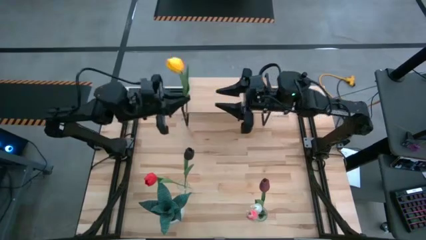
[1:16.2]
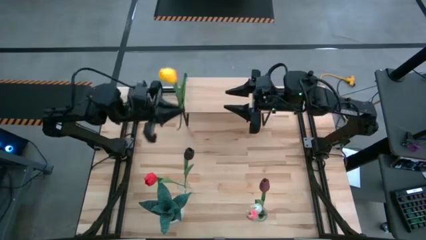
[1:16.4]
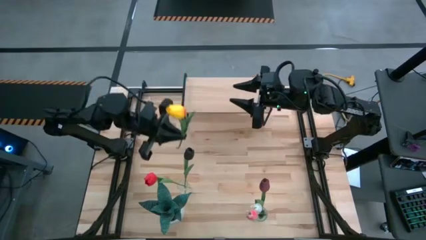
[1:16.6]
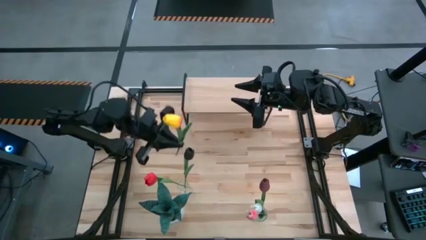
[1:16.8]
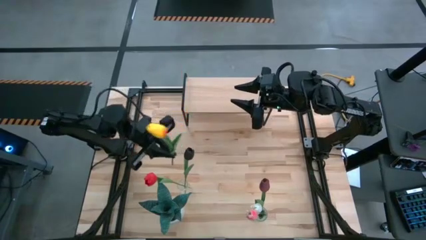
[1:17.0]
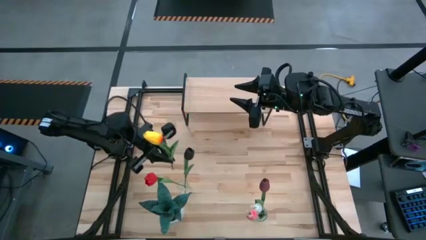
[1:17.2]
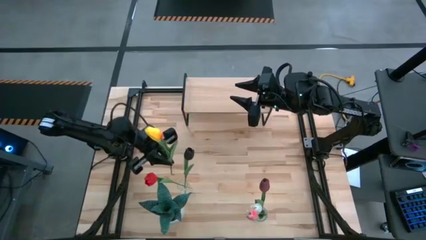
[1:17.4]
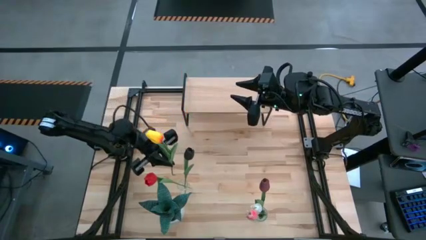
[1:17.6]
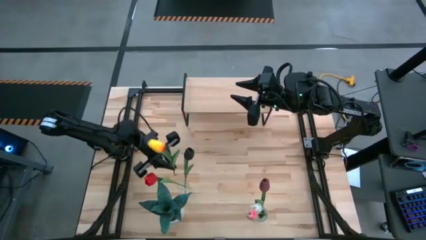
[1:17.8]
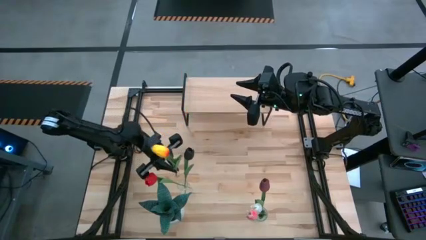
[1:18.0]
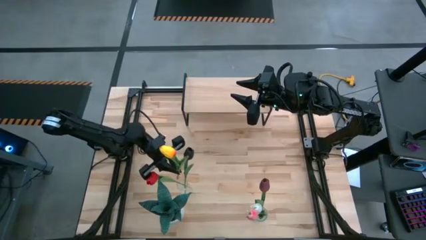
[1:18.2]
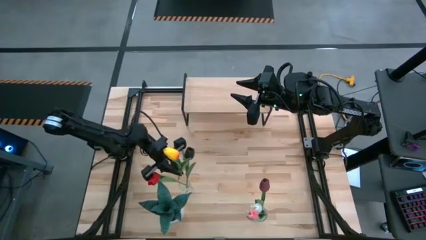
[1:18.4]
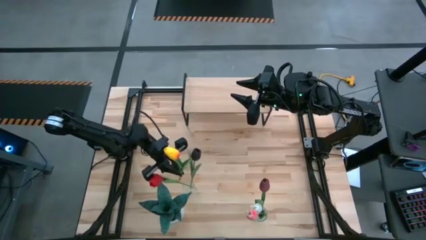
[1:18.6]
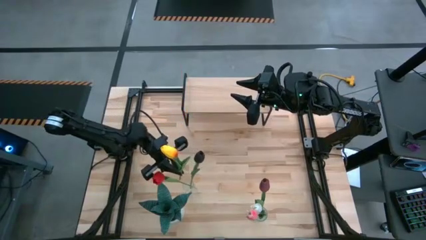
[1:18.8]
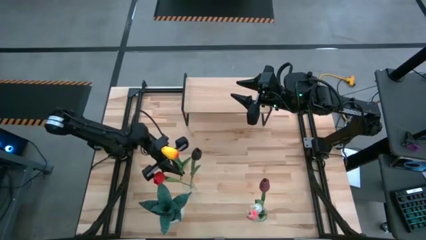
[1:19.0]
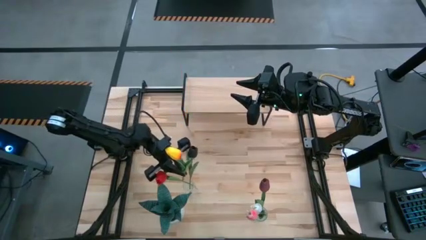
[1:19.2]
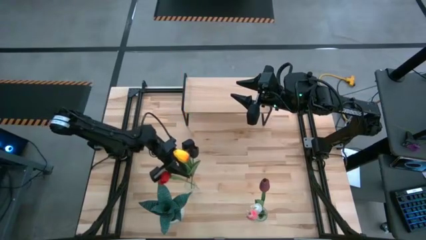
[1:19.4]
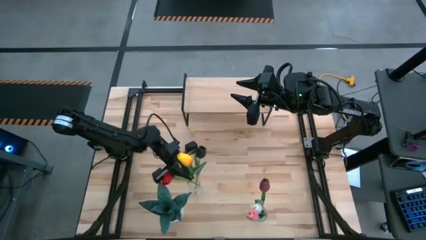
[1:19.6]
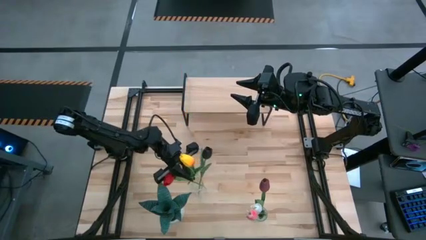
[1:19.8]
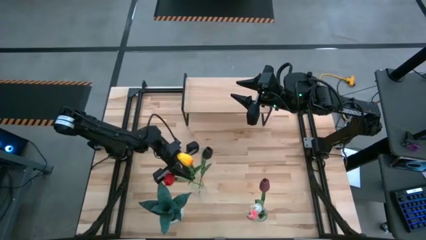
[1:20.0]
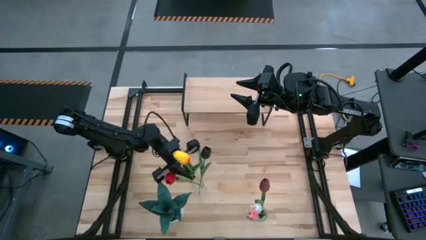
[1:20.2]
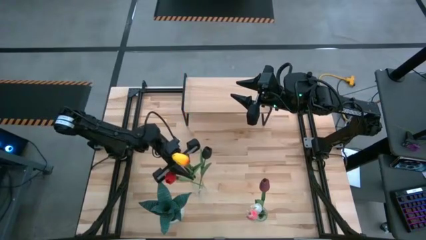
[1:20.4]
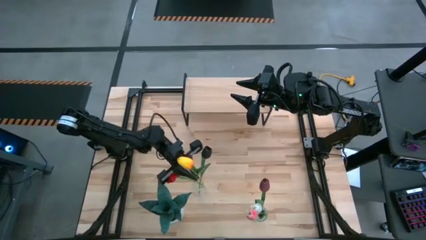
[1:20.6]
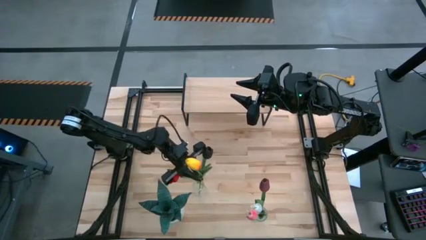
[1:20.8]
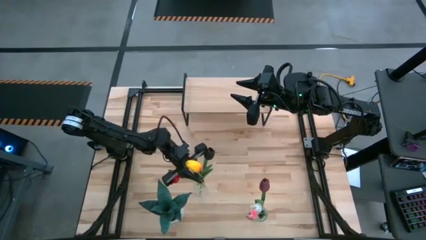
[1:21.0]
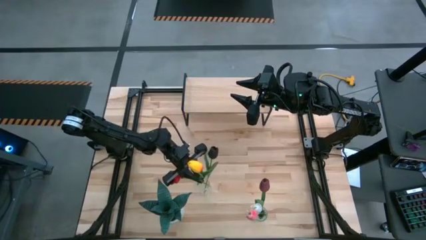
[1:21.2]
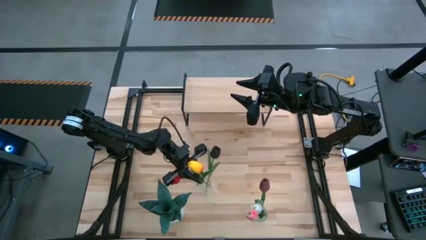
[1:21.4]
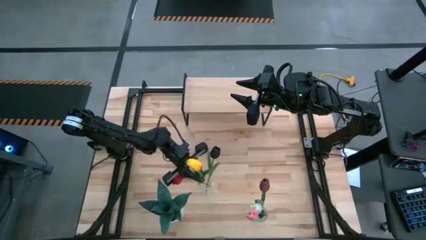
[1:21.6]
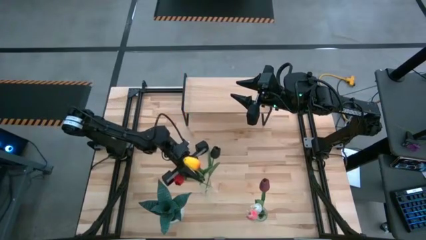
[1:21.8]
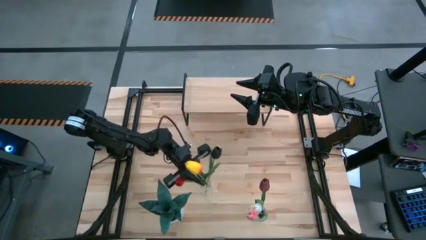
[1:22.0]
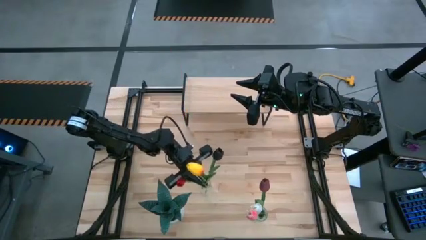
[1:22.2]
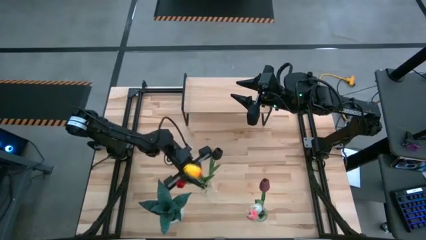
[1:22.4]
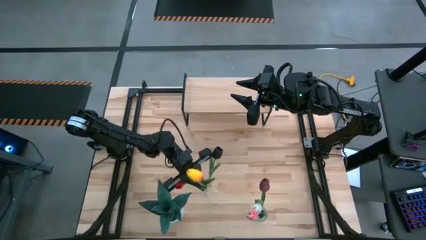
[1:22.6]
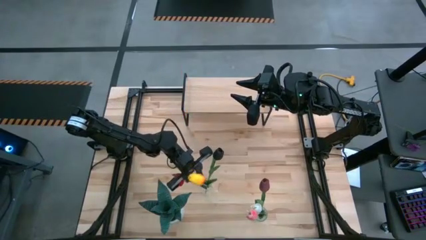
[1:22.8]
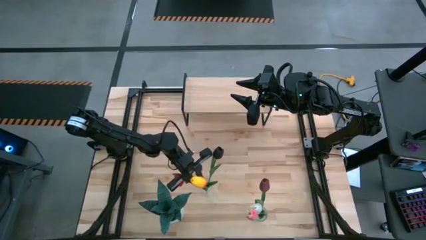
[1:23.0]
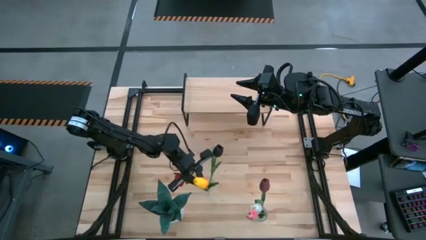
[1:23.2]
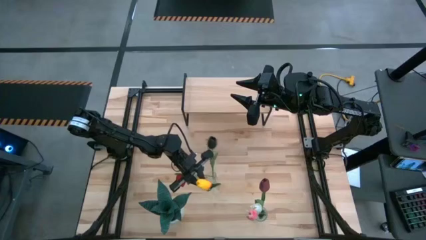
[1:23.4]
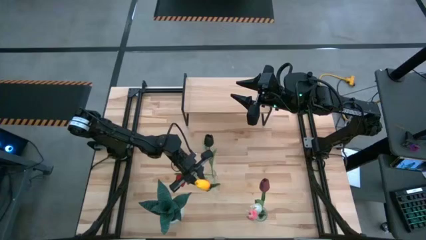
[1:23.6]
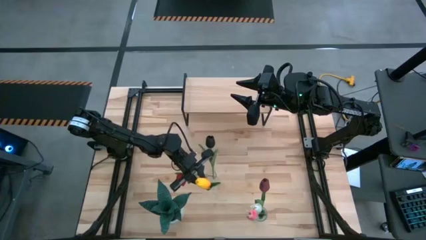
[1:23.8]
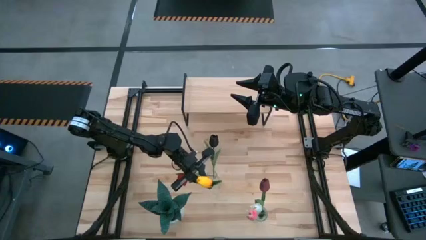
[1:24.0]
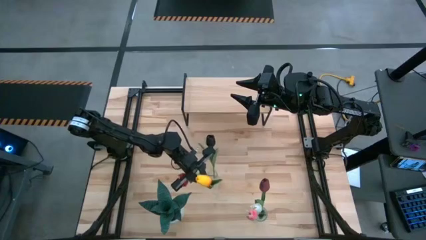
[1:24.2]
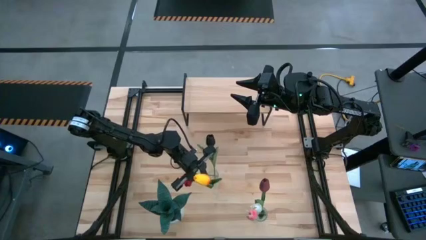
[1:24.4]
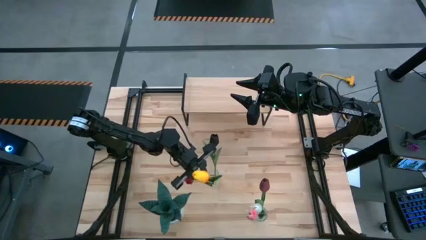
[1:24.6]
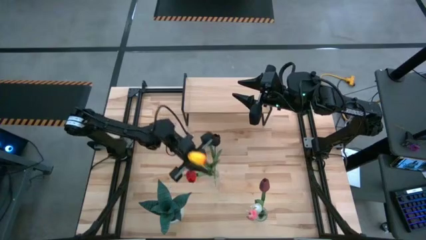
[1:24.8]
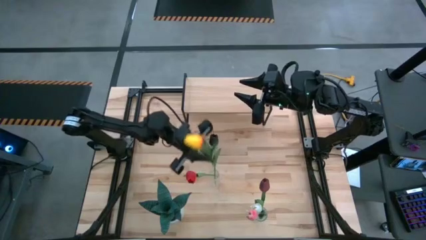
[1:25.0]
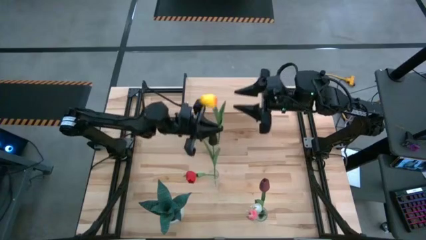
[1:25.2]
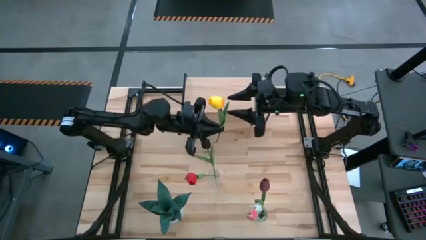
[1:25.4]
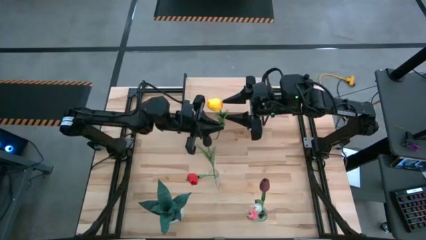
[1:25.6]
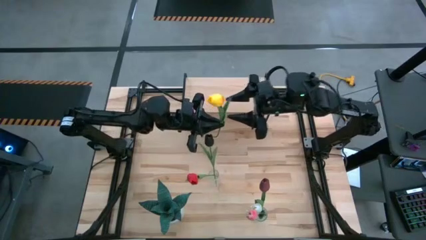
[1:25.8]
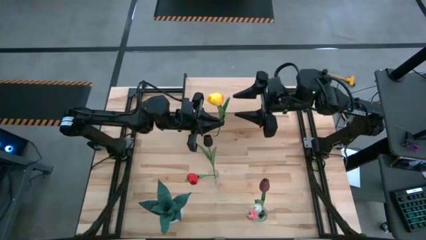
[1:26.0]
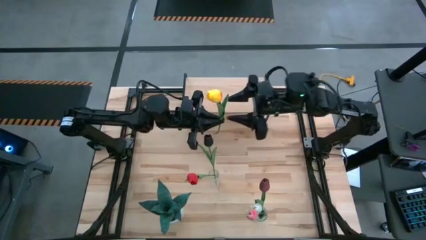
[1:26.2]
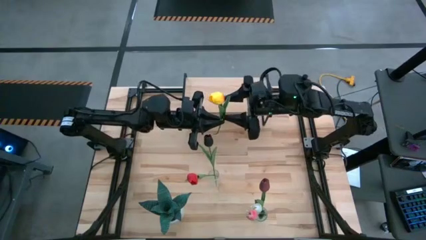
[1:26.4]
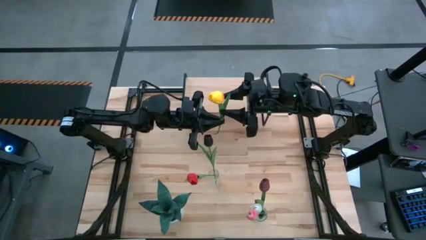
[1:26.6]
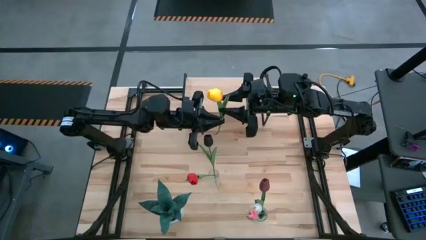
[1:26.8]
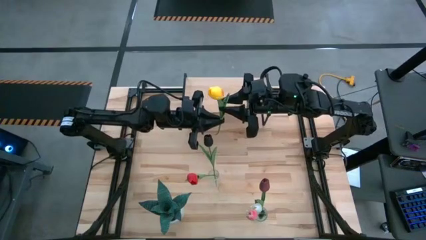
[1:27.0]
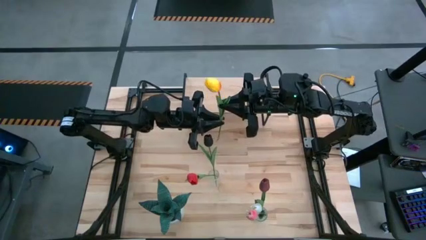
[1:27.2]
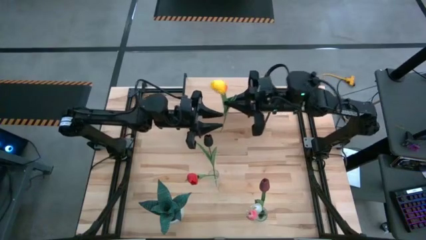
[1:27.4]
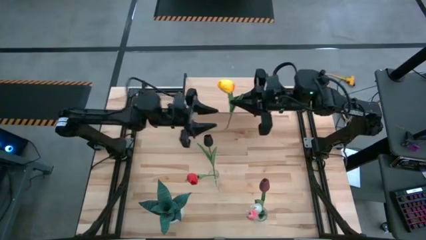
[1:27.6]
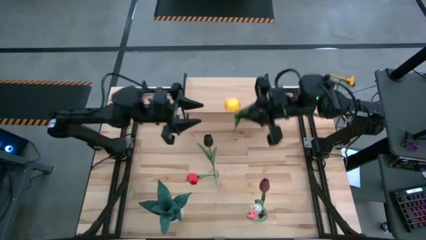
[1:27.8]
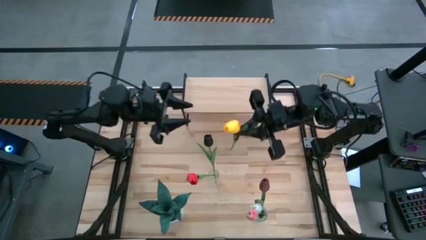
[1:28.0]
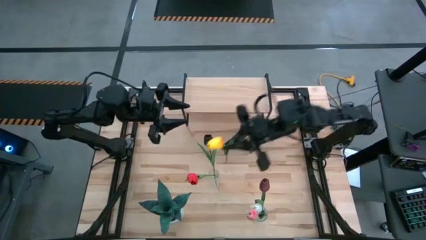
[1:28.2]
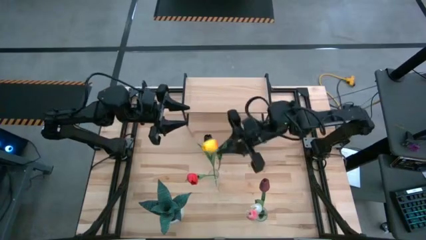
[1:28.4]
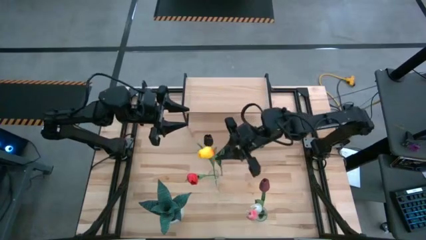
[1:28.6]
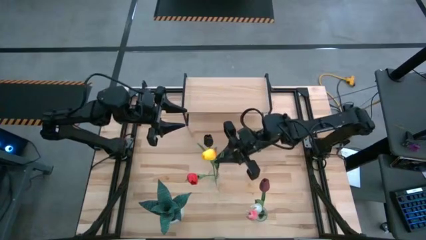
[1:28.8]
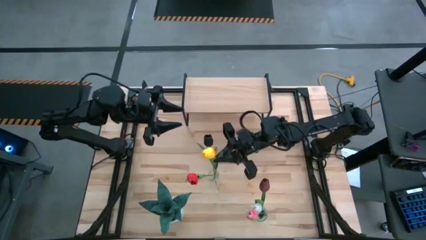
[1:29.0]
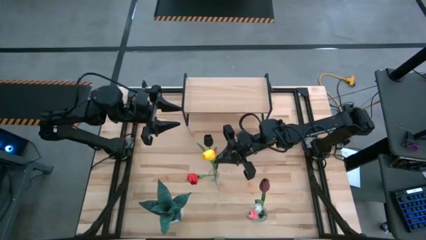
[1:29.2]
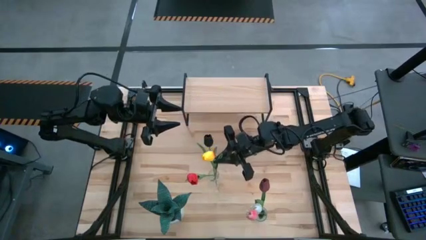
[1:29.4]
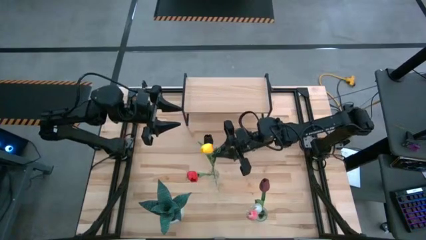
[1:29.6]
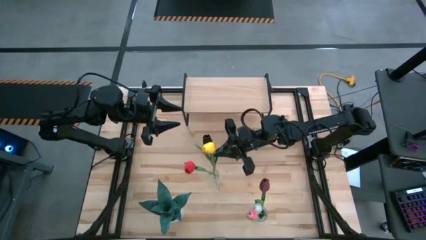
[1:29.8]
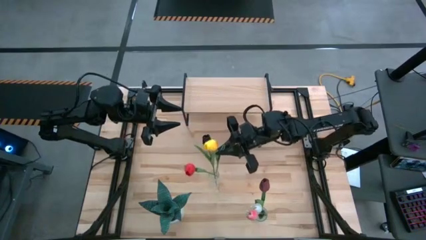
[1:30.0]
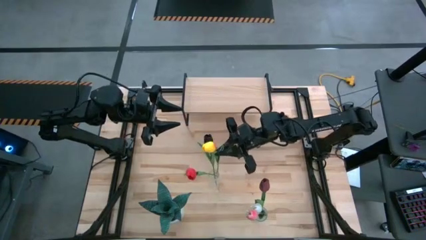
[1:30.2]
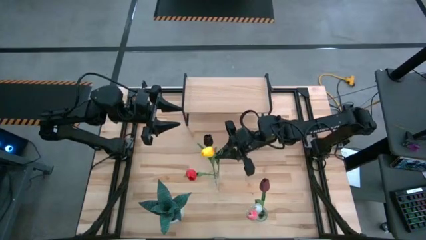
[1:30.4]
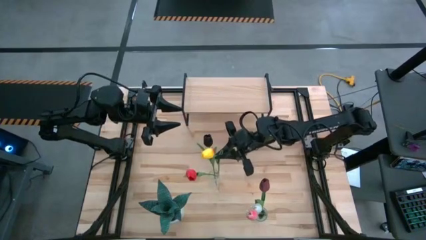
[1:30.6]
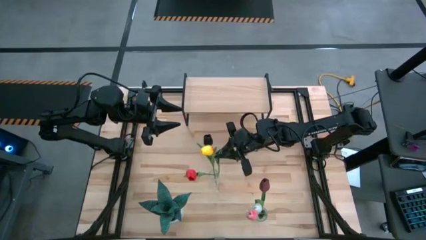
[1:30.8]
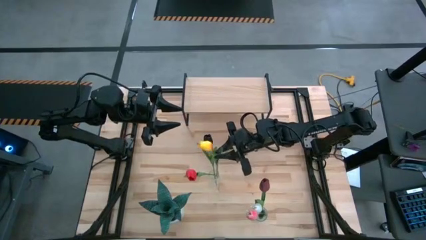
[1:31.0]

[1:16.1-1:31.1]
Task: Pick and place flowers into a vace then onto a shelf
Adjust the yellow flower in the top transparent vase

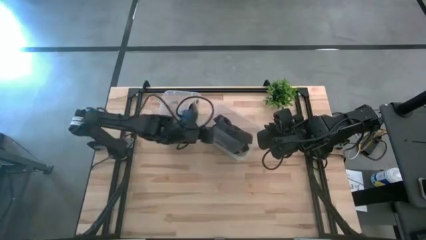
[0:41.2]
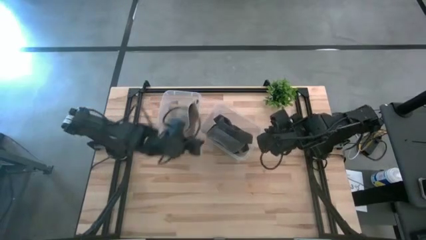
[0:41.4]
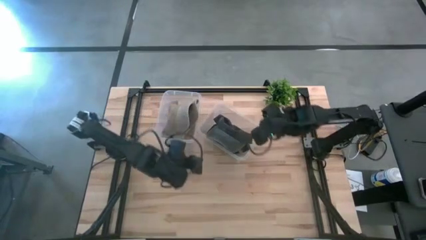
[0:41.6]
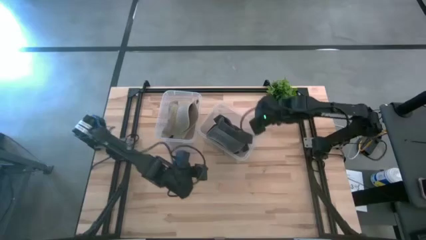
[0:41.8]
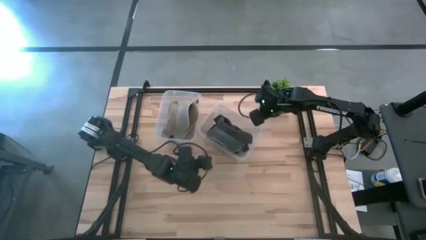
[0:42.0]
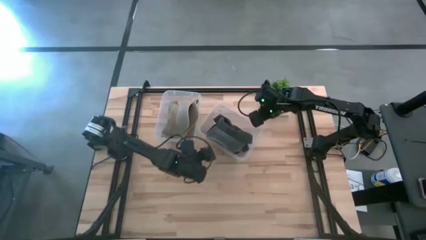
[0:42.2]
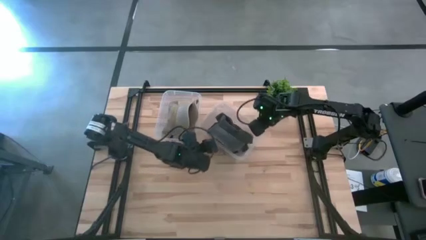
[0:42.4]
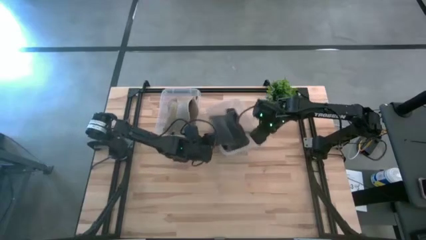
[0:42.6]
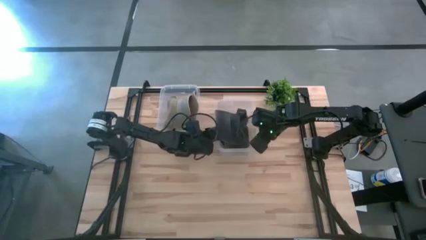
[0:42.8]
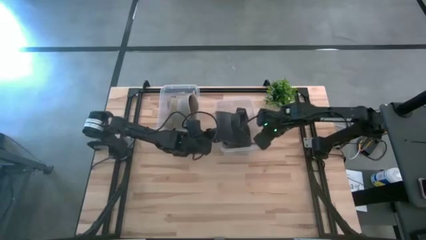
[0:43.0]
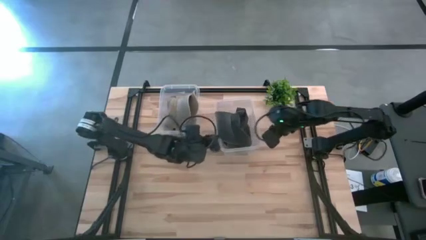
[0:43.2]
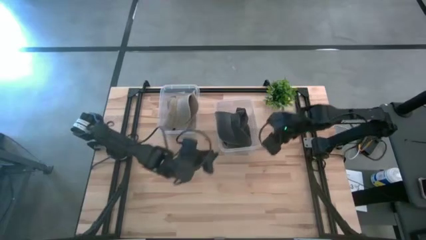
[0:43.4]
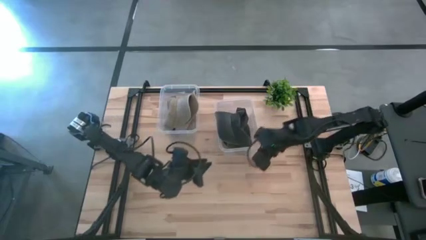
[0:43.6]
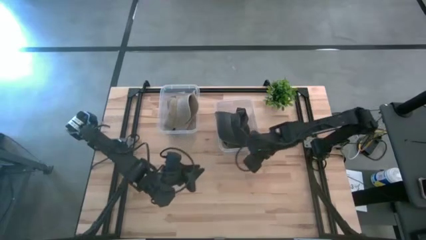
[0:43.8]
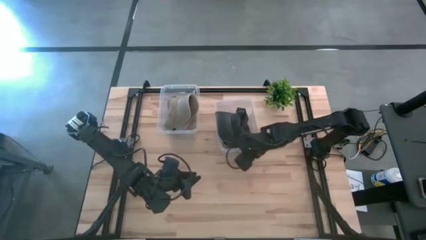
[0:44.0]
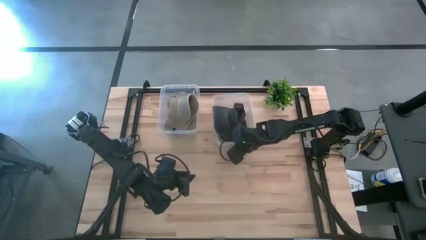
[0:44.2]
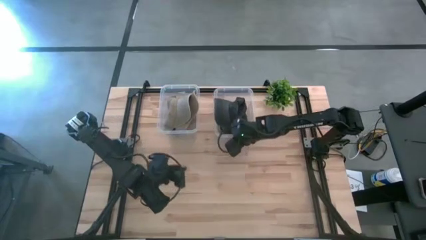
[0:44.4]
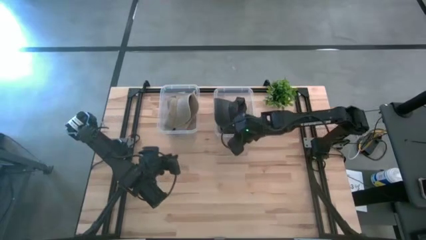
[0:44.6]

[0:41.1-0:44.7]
Task: Pick & Place hat
Adjust the right transparent bin
